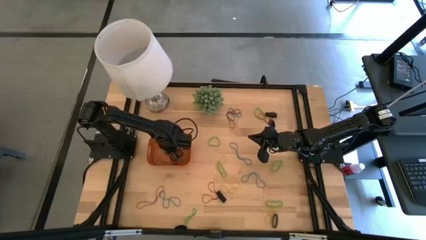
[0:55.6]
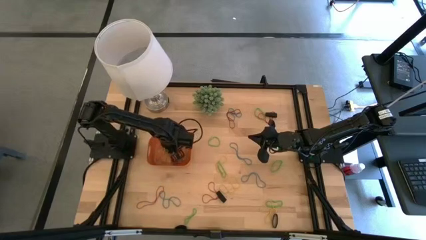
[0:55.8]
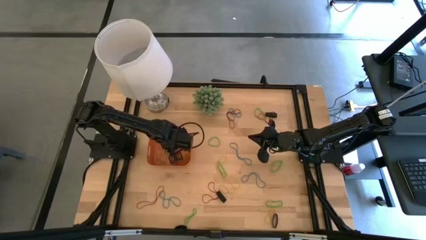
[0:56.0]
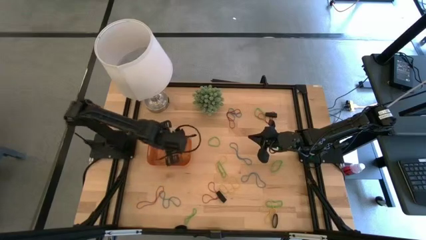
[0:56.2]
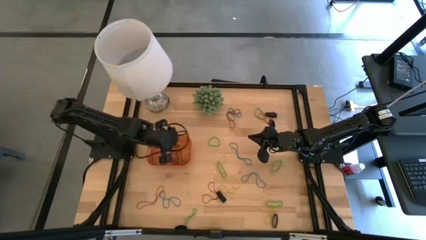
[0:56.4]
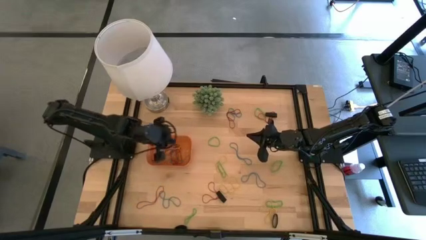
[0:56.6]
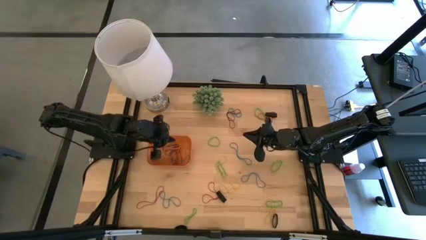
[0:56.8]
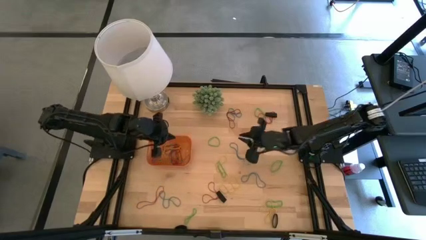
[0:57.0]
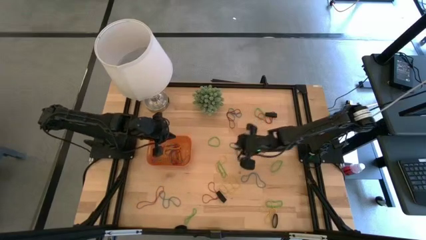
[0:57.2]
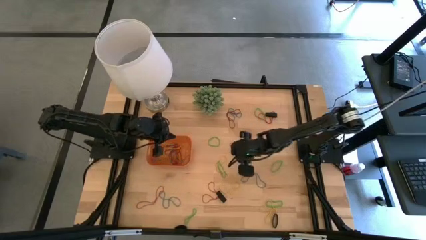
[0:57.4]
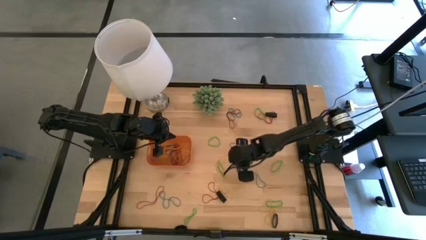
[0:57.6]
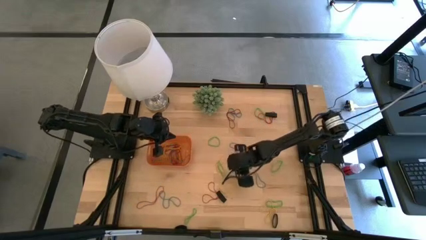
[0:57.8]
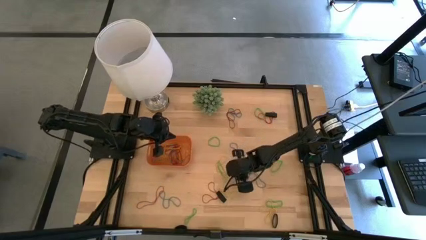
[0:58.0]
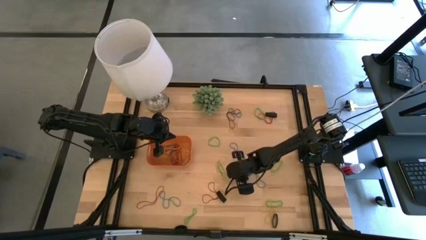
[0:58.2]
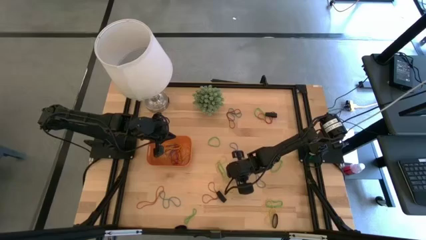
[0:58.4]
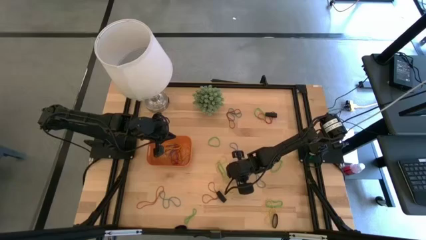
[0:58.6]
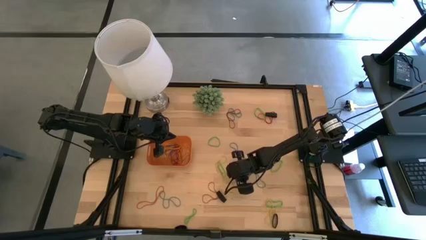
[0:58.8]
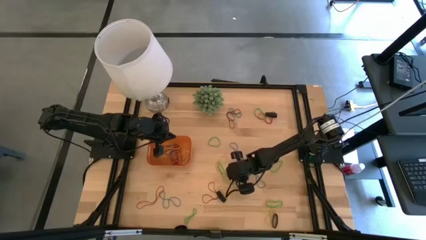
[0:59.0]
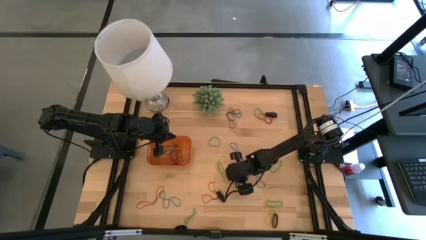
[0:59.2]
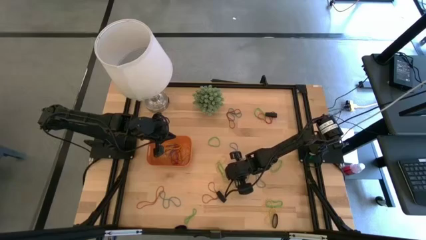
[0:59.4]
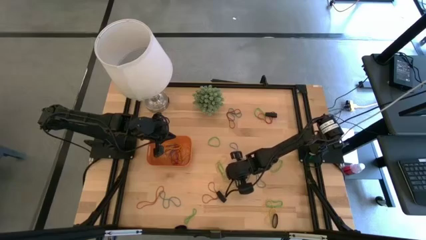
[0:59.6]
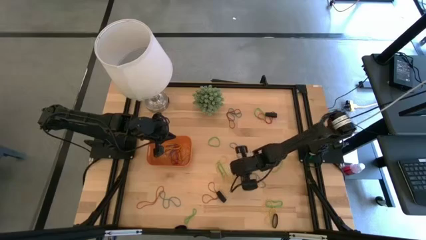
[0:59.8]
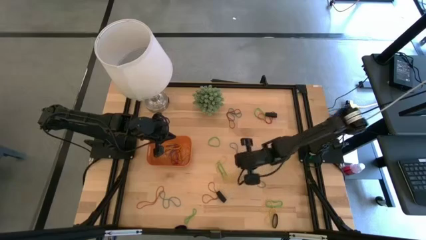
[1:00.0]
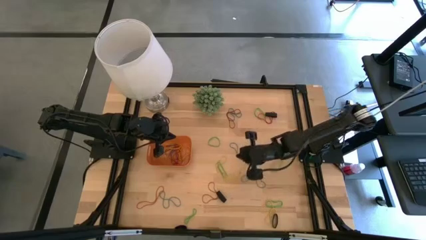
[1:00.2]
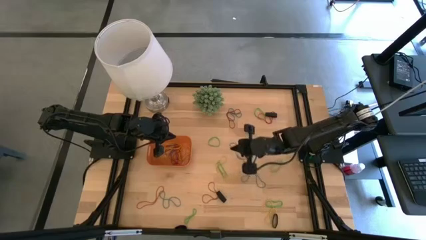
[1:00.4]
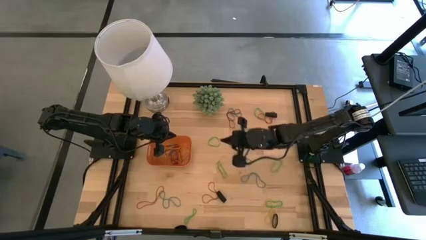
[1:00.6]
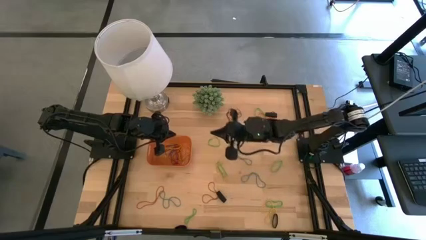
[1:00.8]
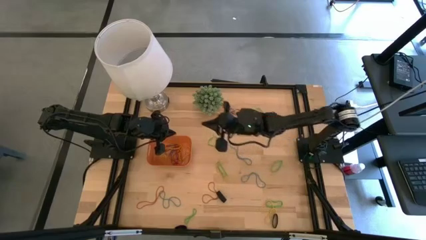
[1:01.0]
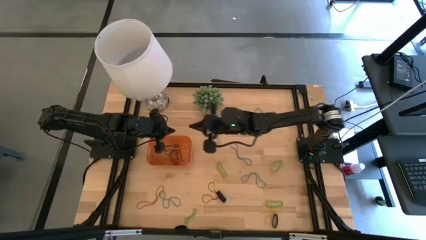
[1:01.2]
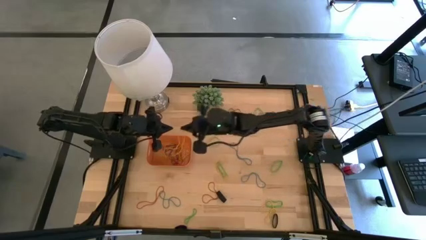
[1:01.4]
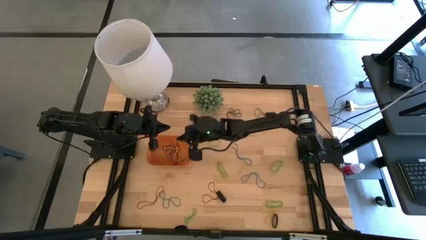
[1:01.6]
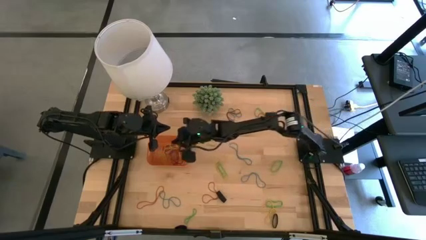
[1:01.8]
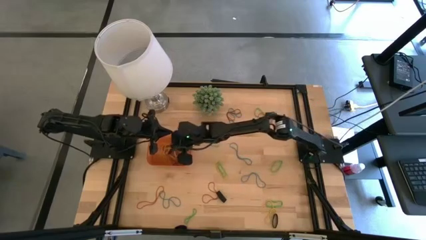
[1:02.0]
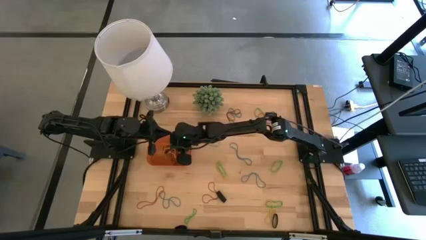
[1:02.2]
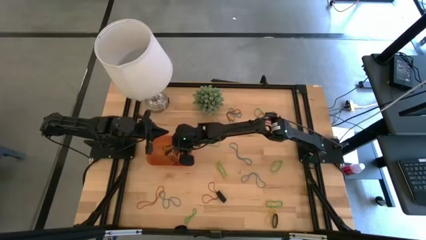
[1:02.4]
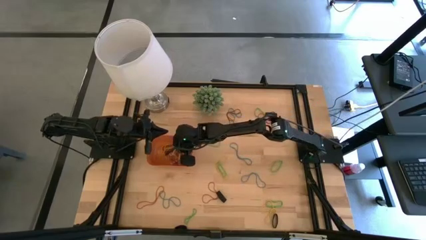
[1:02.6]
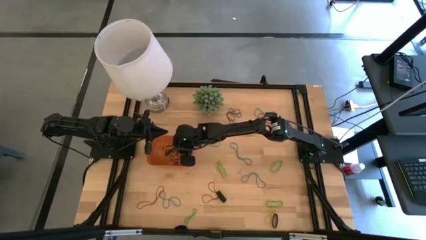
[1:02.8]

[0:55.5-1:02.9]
Task: Pick and place rubber bands into bin
Put the yellow rubber band into the orange bin

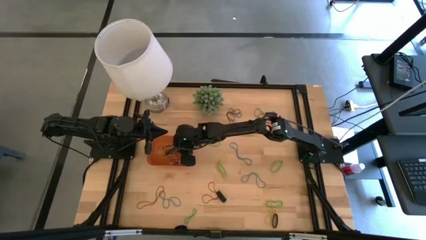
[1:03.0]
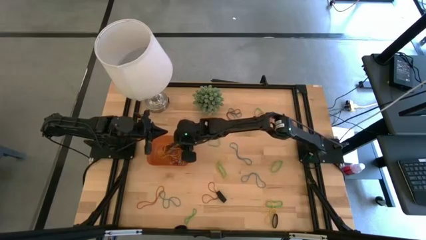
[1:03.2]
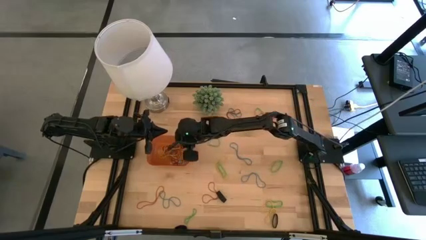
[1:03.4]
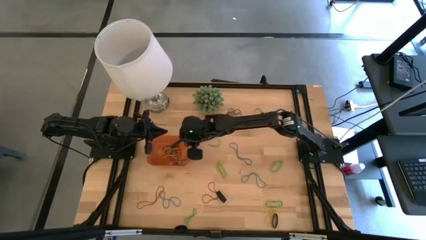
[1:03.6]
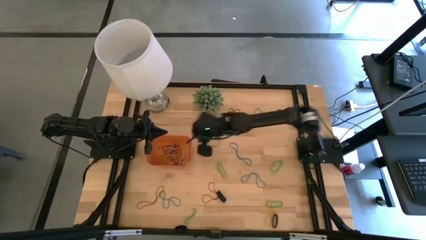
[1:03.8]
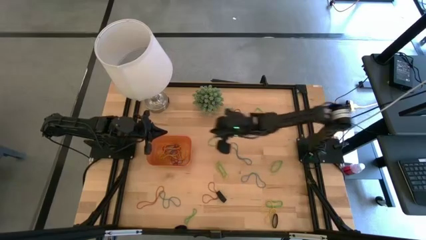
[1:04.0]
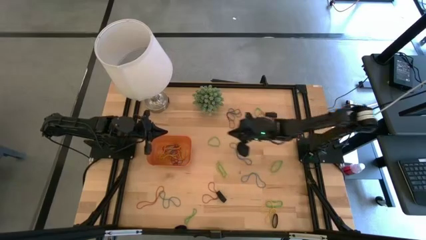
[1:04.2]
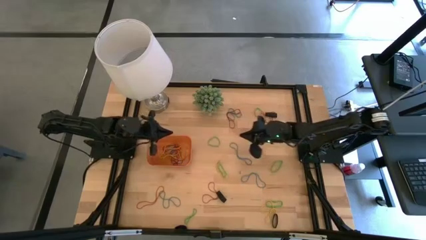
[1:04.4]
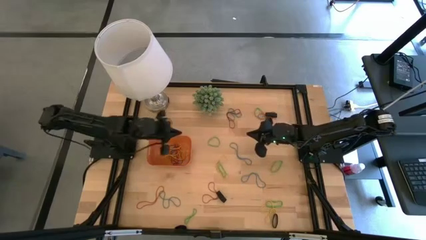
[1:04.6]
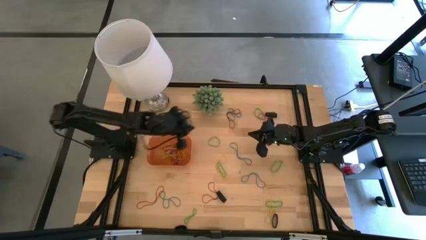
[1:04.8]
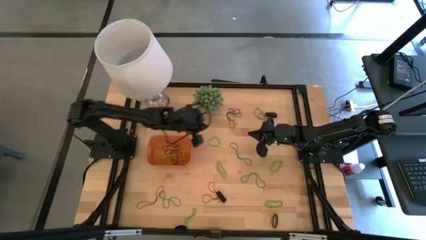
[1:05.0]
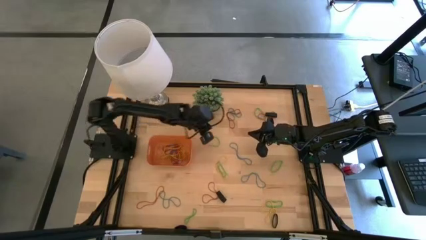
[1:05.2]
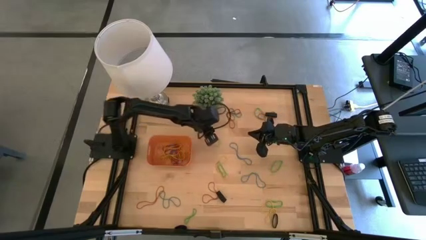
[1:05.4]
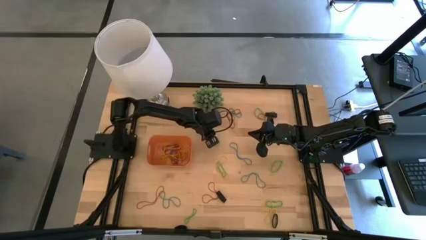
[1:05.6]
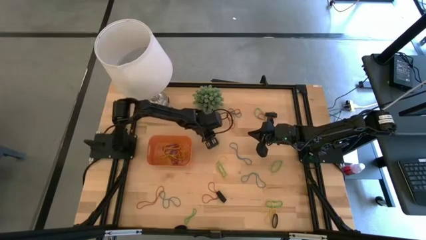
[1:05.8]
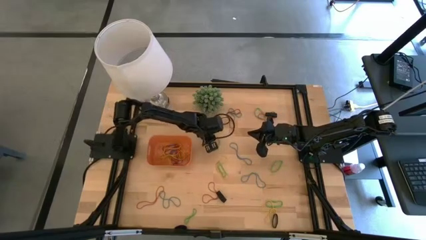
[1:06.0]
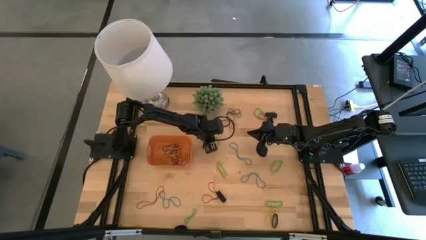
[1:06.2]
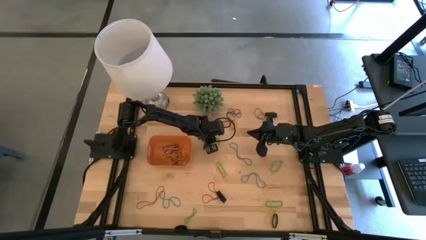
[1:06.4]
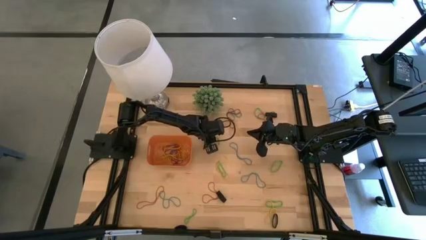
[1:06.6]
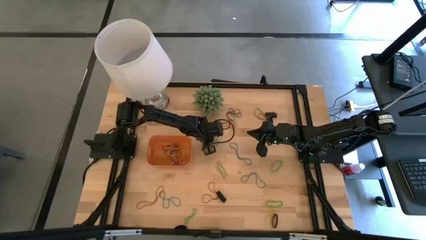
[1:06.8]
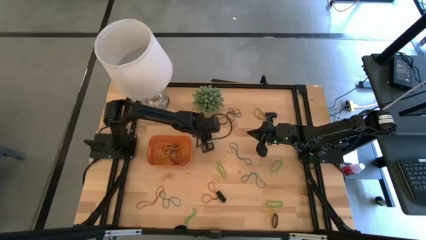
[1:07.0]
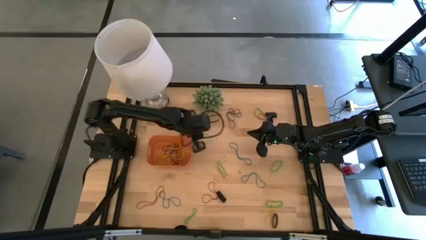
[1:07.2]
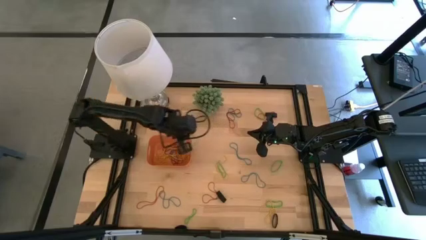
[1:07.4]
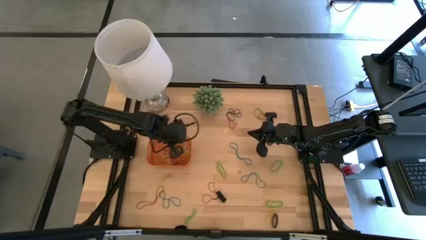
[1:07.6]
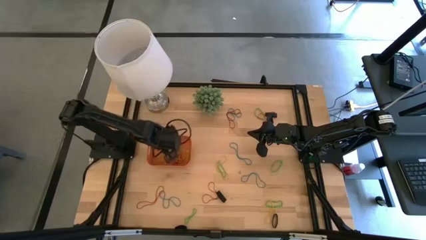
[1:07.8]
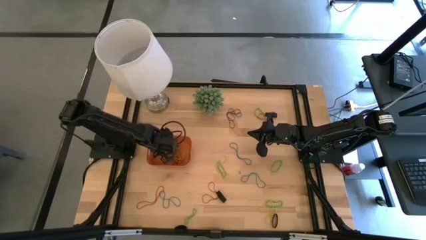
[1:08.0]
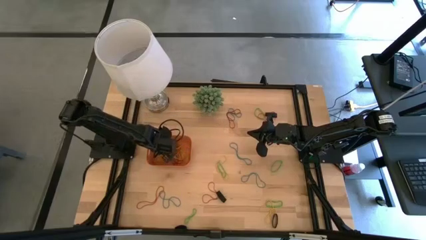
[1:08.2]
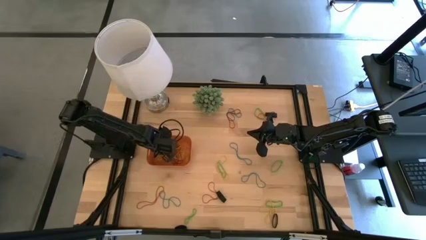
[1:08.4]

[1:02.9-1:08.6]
Put the green rubber band into the orange bin

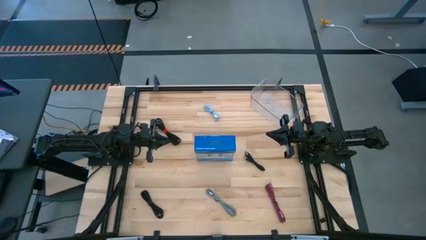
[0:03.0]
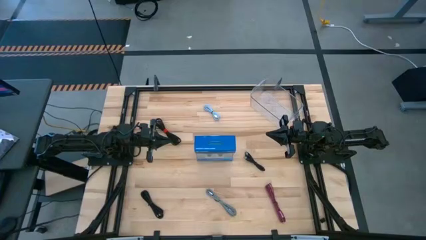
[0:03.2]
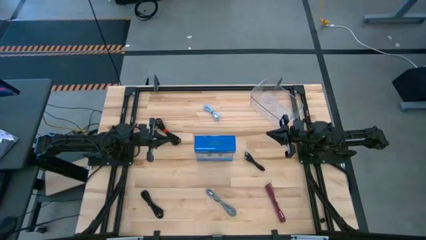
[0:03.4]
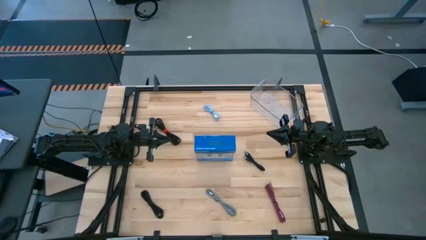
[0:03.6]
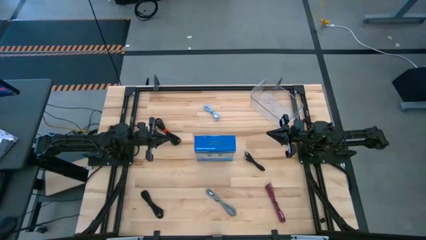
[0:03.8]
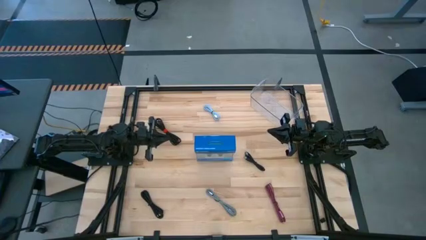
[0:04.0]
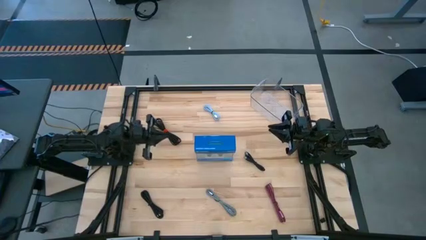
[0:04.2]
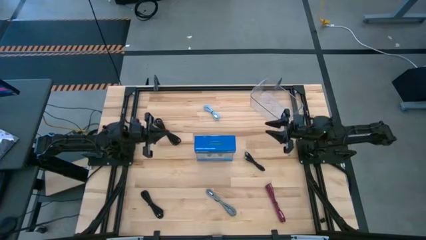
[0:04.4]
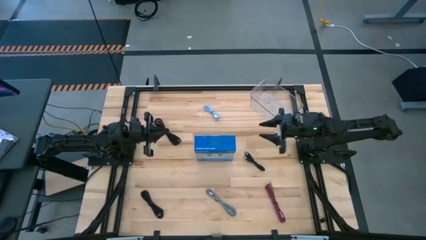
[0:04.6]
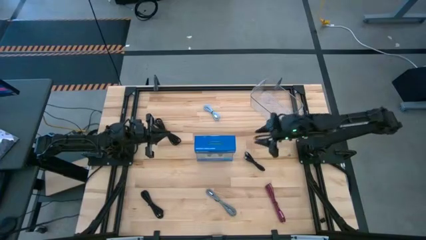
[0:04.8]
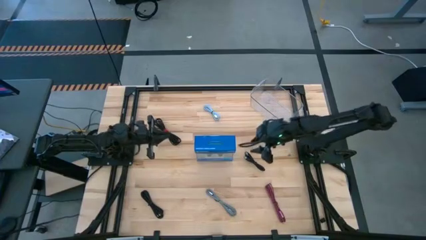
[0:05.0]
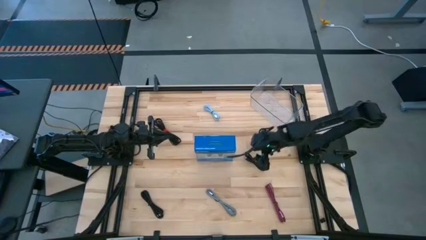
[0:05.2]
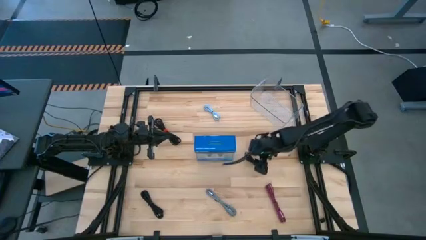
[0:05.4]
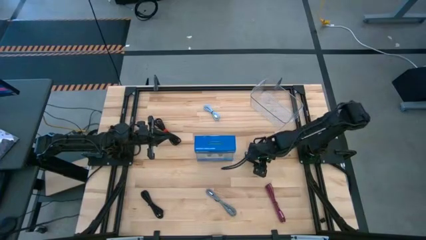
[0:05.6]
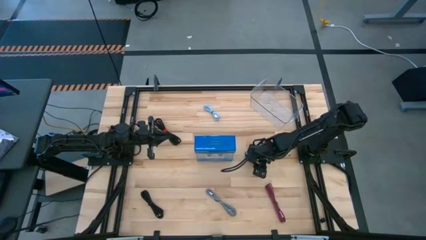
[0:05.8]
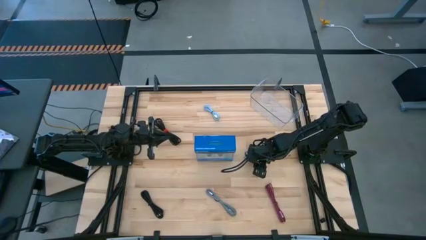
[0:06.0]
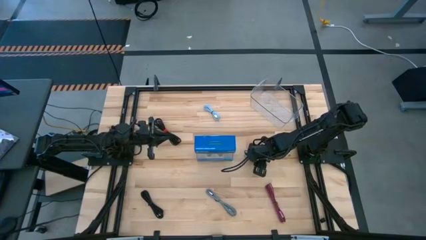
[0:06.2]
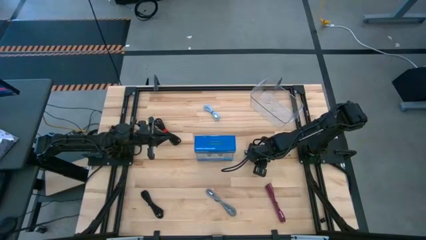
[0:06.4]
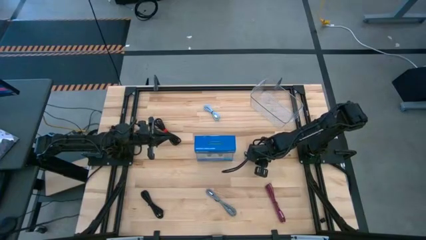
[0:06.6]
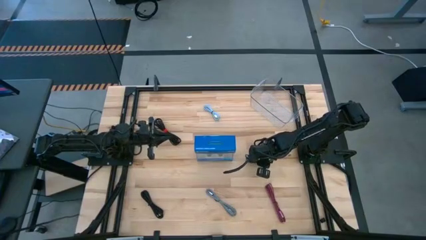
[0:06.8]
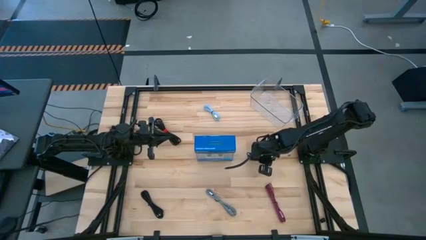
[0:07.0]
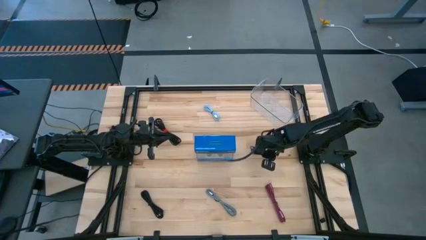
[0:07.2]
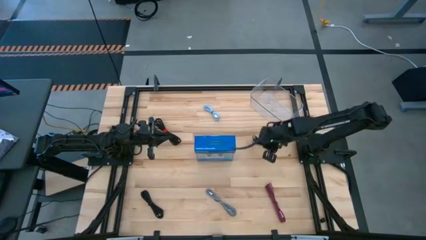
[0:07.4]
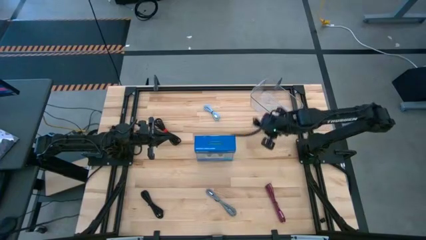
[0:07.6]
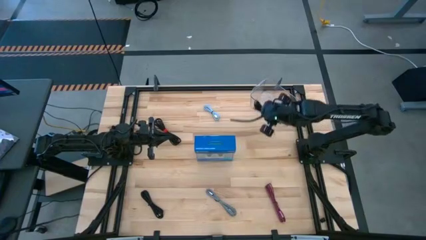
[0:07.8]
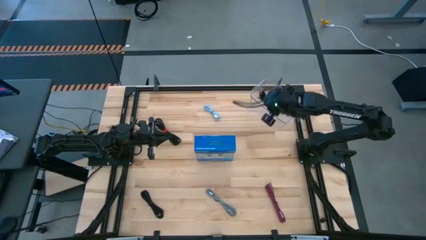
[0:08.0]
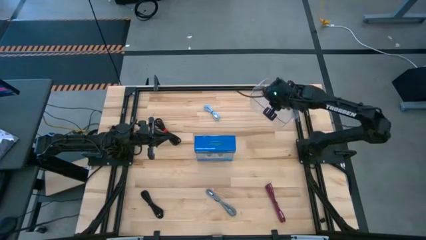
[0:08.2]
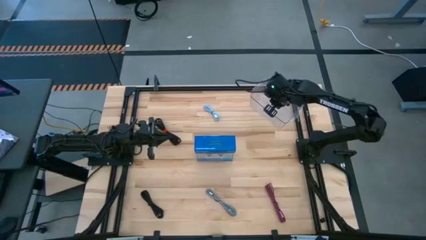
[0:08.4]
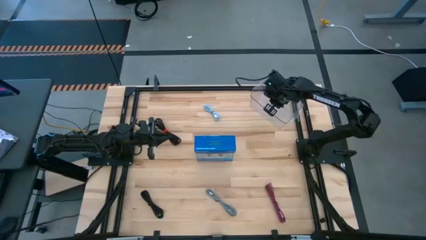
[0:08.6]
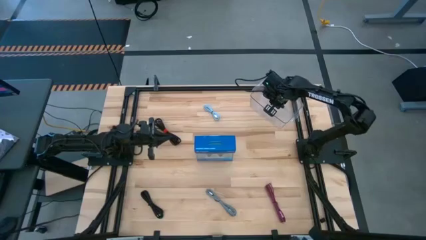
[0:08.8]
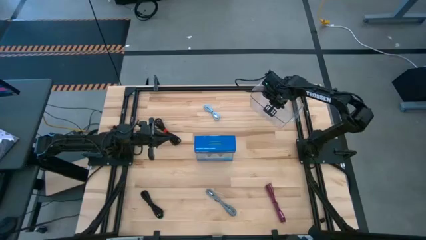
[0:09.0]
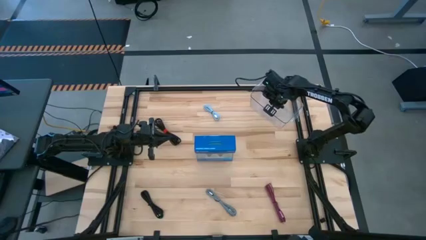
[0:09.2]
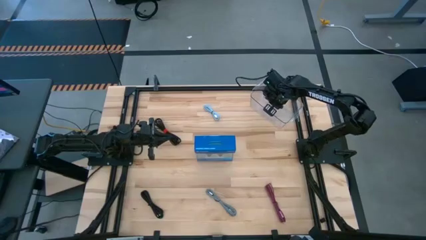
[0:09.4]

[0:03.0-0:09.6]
Task: Pick and place USB-C Cables
Put the right black charger cable into the container
